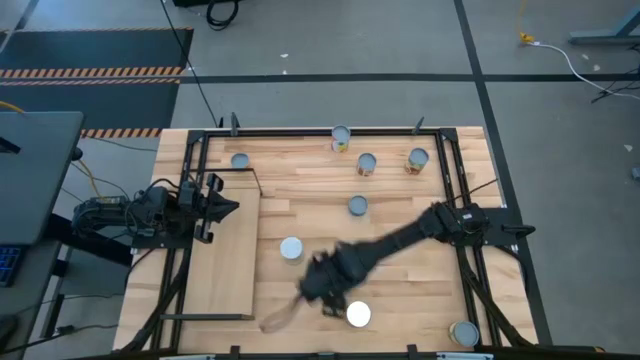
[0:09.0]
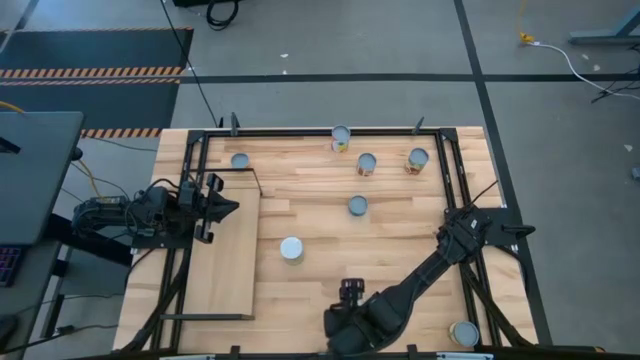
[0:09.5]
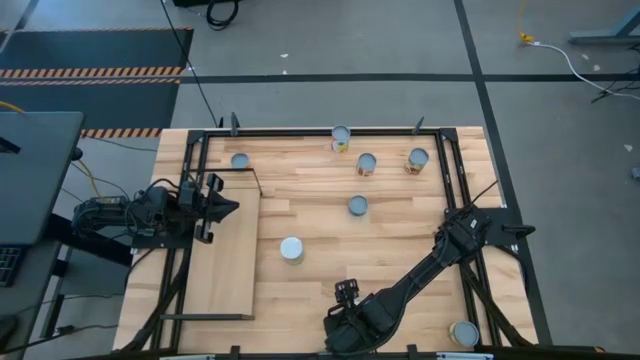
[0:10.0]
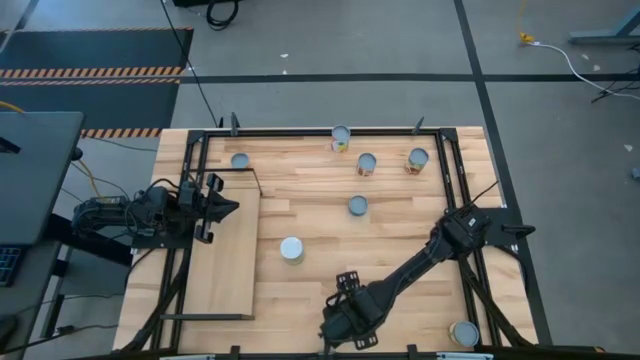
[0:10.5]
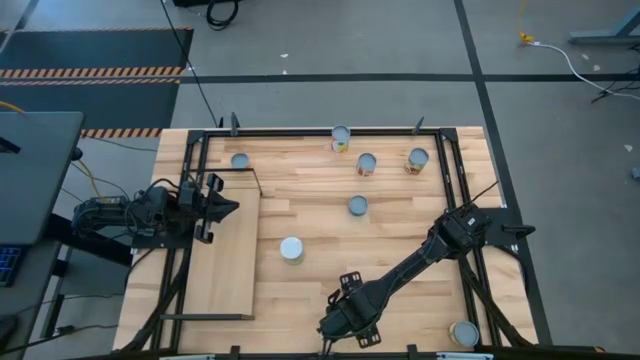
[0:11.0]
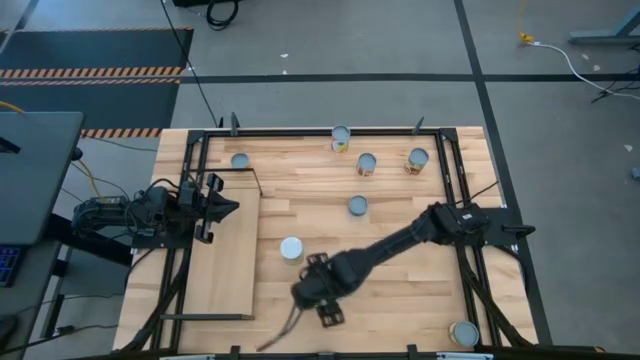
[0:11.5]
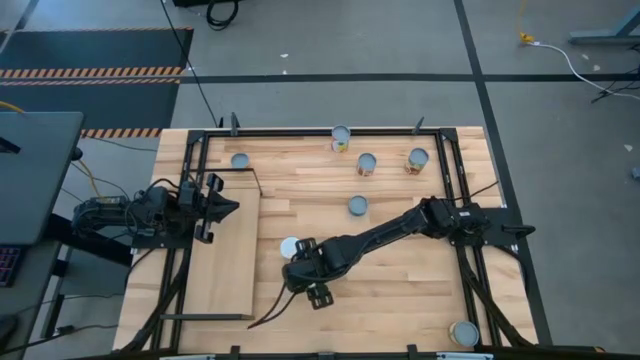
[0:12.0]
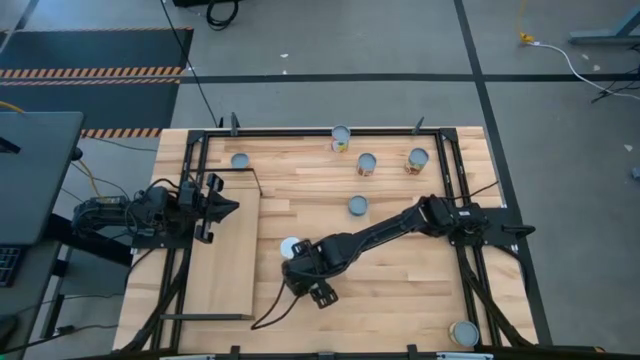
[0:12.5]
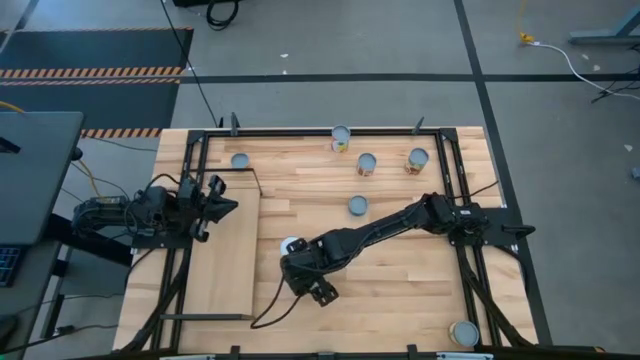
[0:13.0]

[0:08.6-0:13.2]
Task: Pick and place cans onto a shelf
Move the canned oranges to the middle of the table

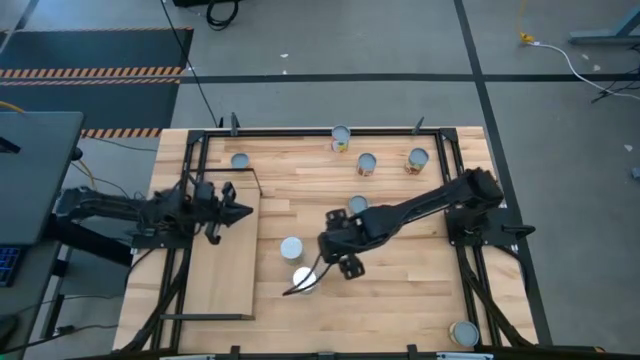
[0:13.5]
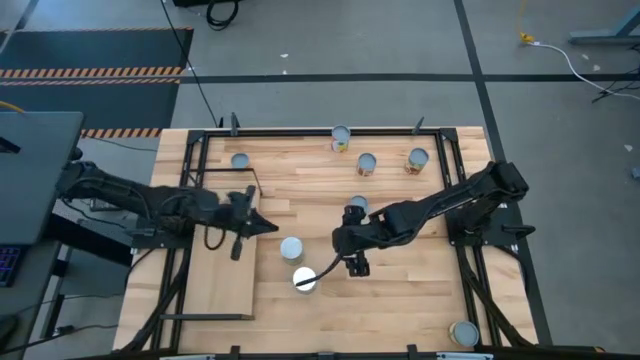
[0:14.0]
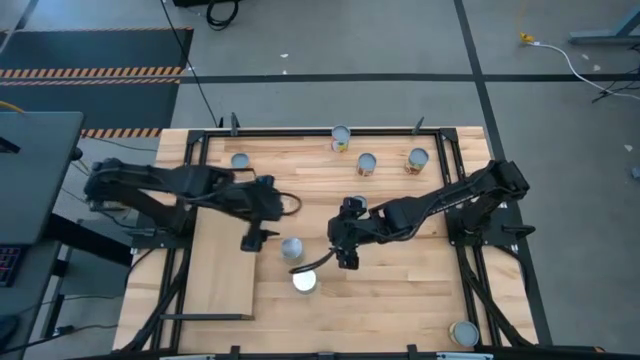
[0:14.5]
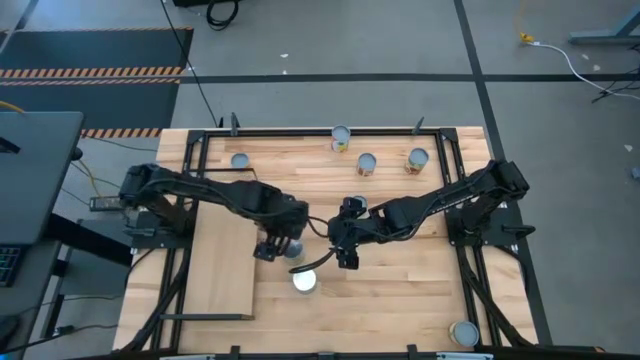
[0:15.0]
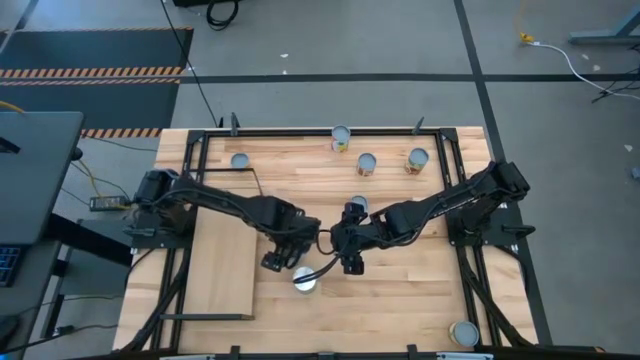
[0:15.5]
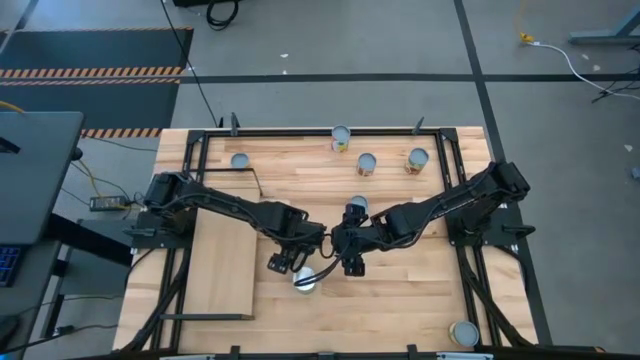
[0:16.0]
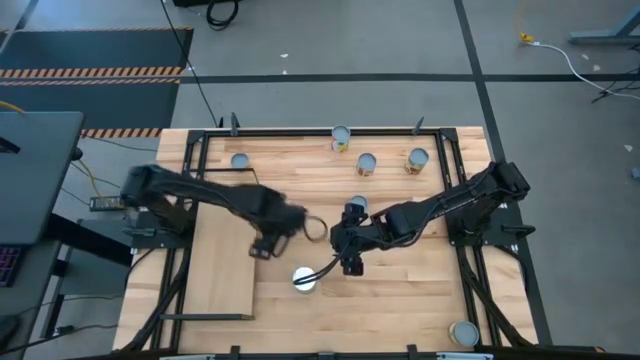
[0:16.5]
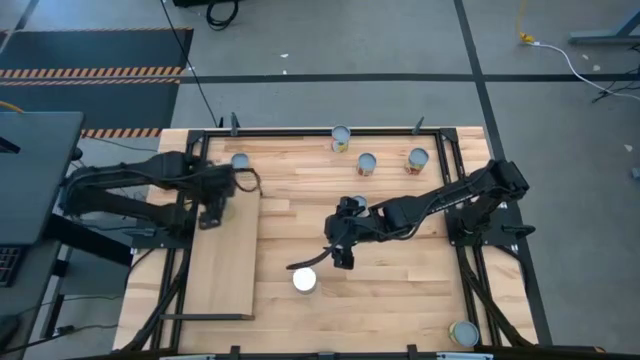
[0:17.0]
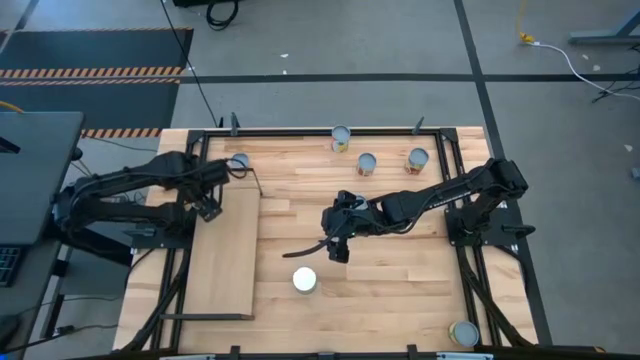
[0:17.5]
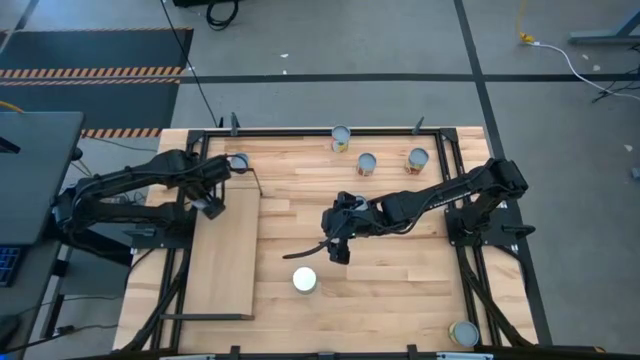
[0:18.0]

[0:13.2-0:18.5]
Put the canned carrots on the shelf

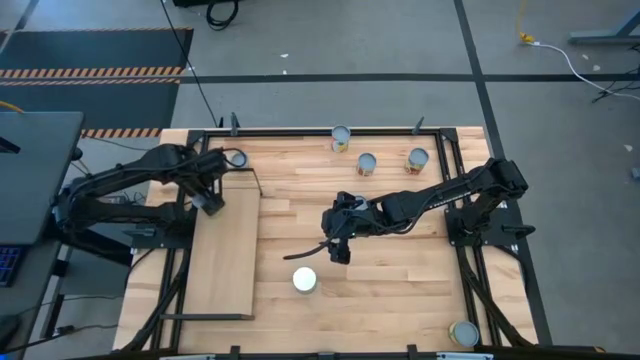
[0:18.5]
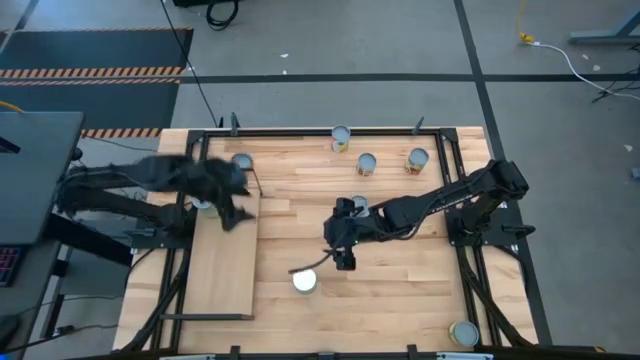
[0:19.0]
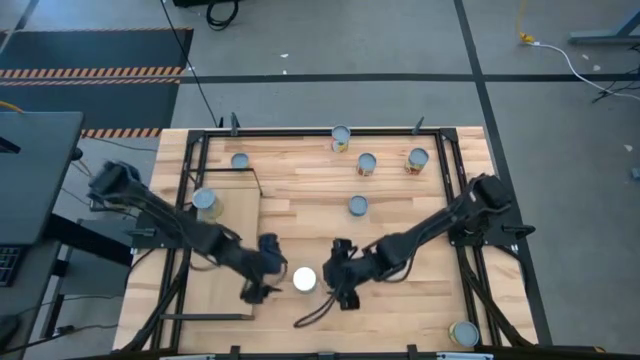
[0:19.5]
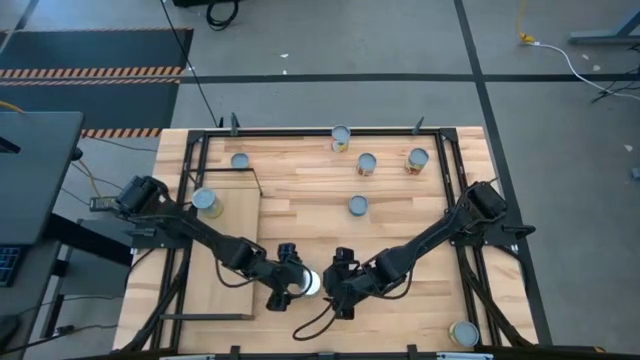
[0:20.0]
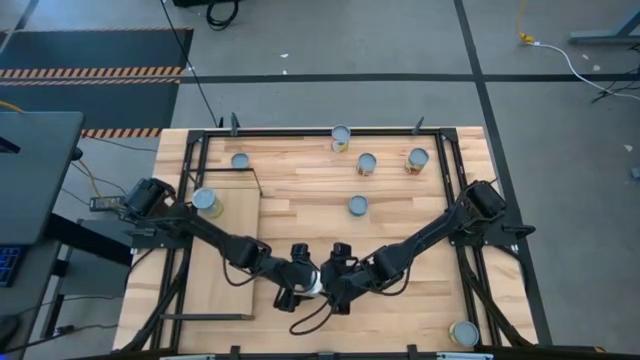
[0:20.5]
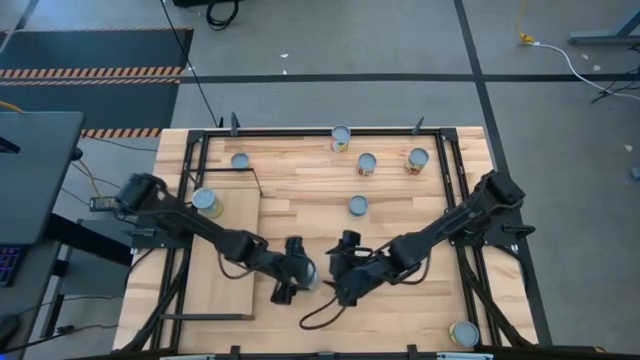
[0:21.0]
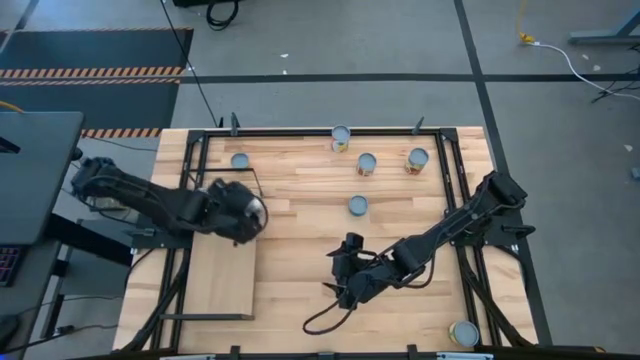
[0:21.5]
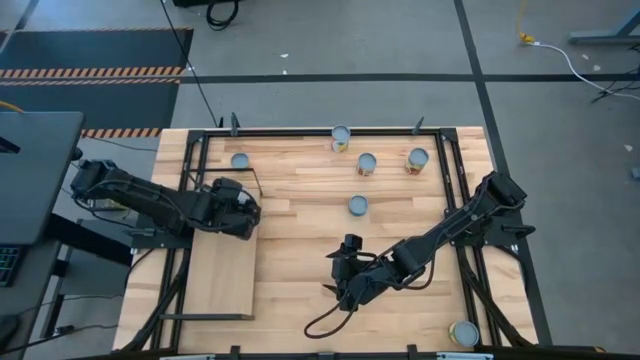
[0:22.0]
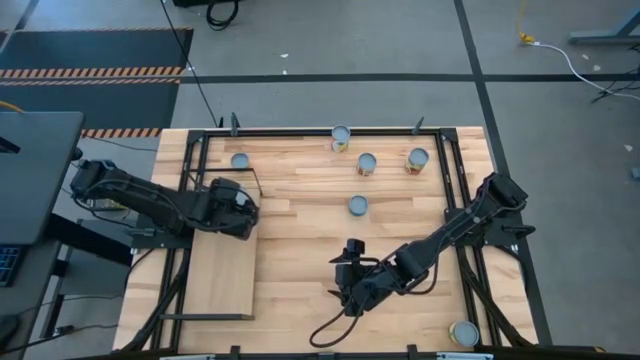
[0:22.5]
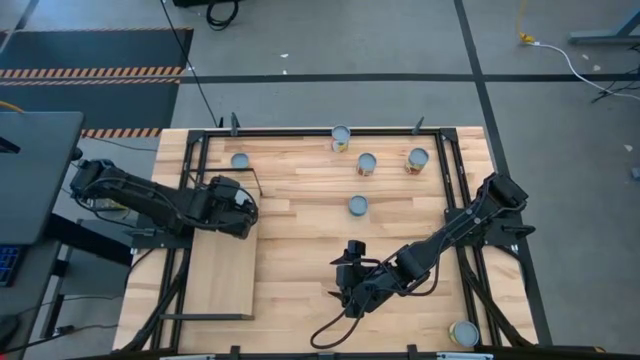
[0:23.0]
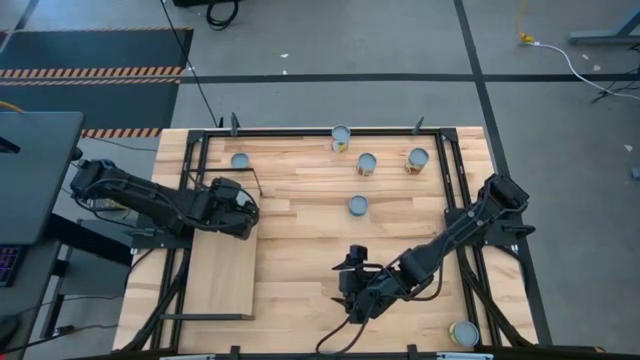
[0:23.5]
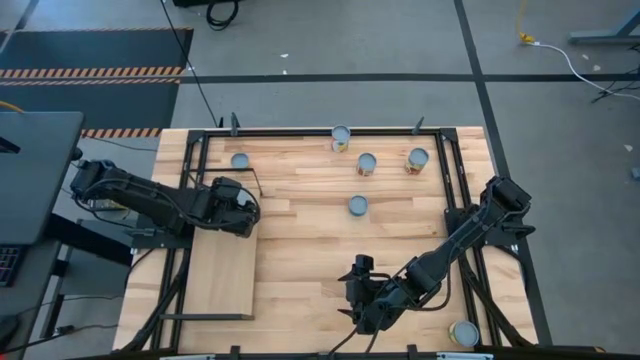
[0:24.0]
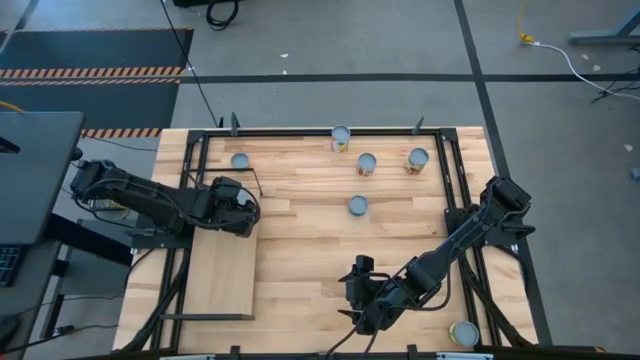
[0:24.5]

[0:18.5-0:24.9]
Put the canned oranges on the shelf

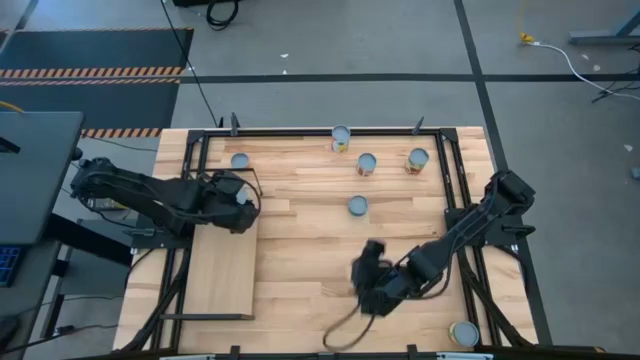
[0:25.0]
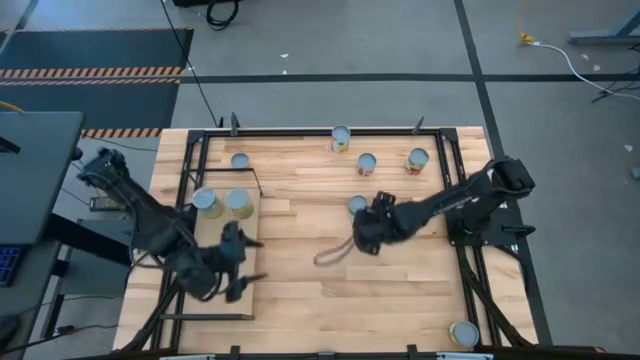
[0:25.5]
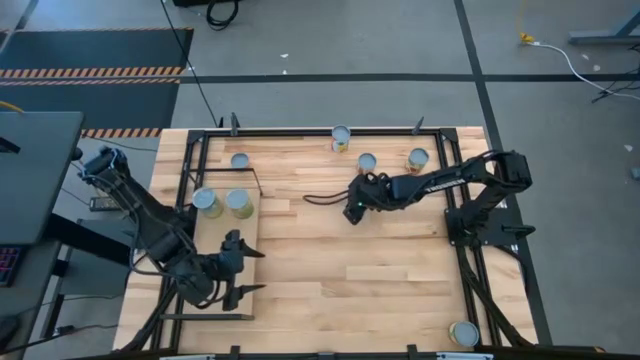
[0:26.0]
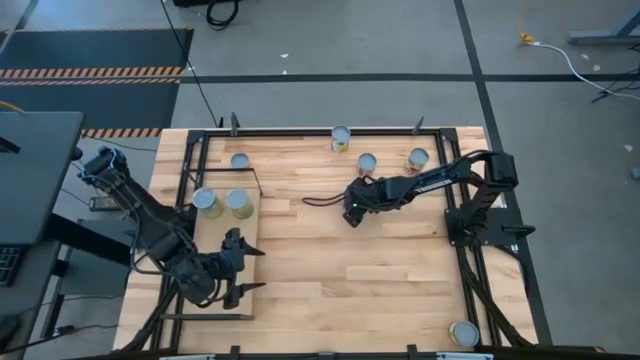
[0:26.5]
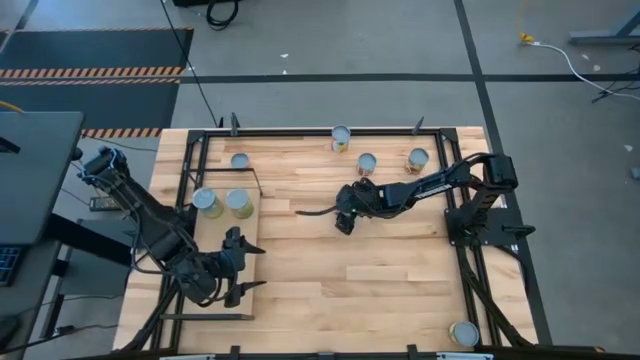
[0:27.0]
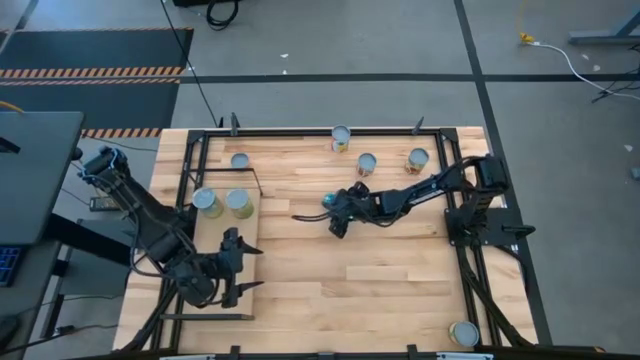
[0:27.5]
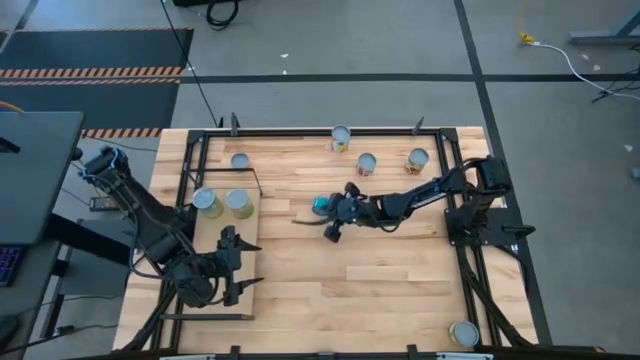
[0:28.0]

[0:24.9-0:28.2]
Put the canned tuna on the shelf
